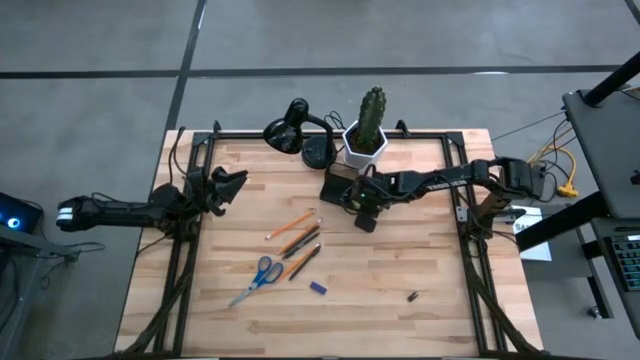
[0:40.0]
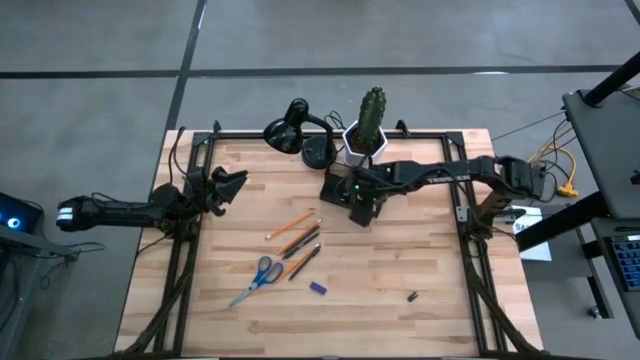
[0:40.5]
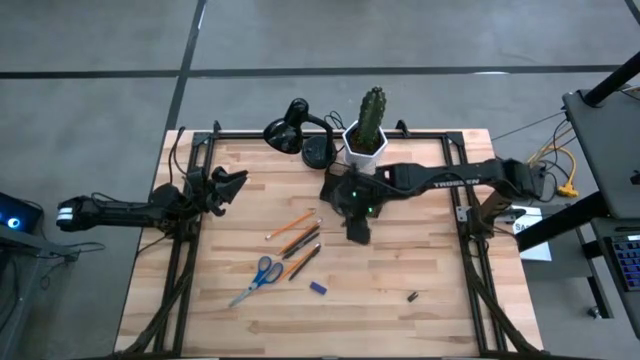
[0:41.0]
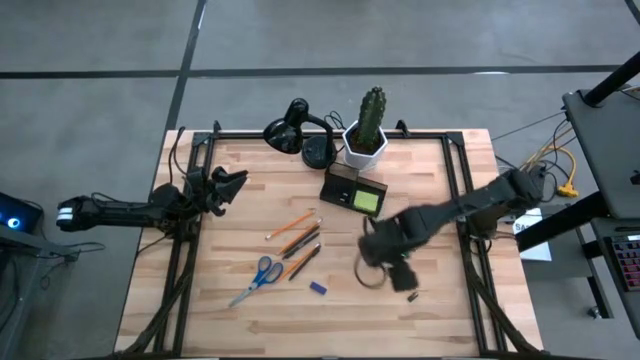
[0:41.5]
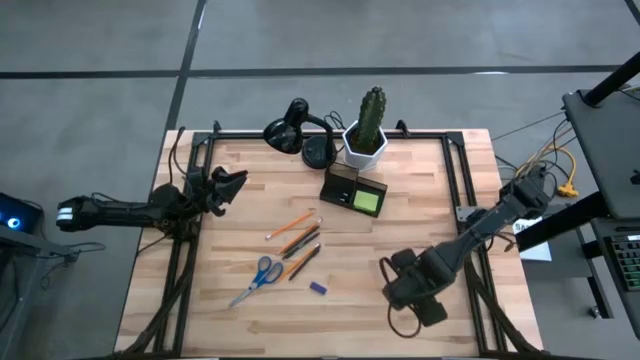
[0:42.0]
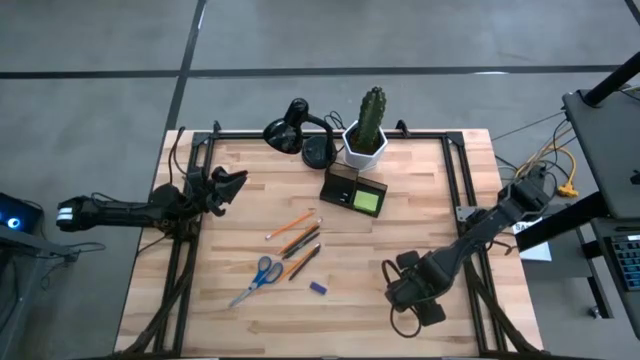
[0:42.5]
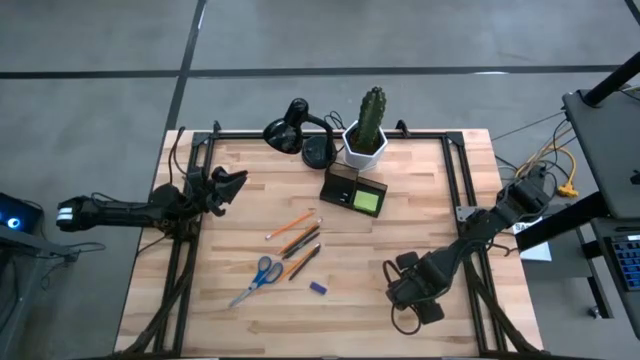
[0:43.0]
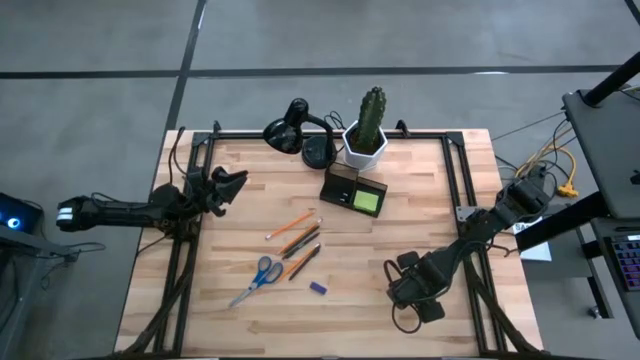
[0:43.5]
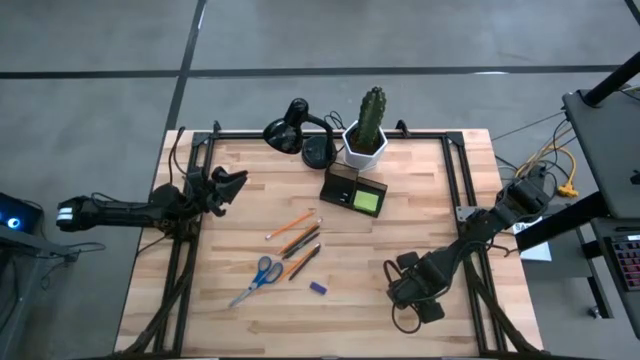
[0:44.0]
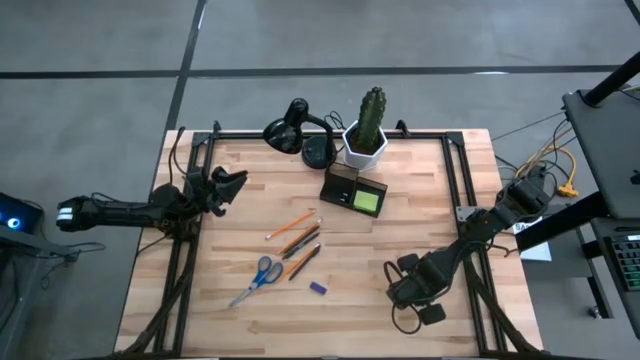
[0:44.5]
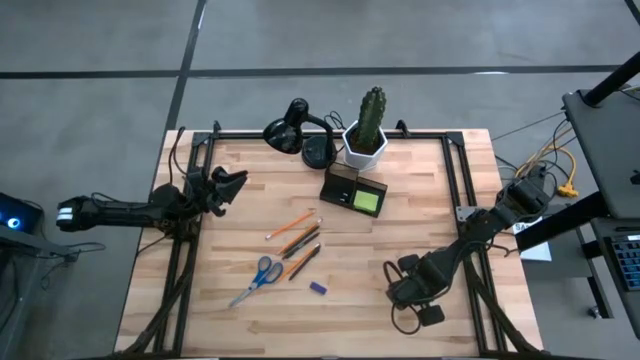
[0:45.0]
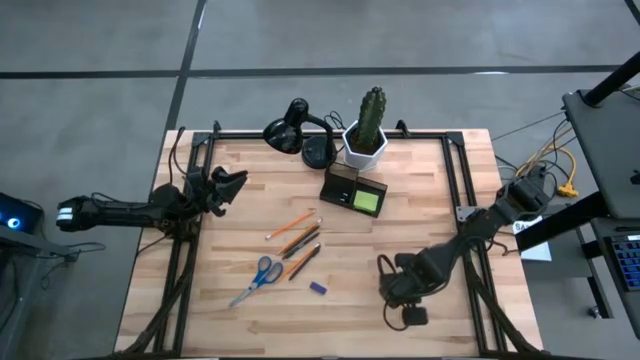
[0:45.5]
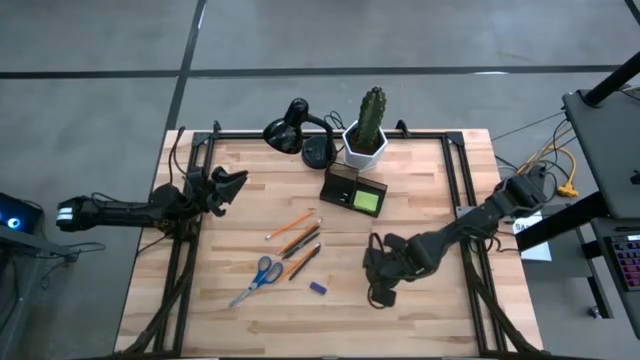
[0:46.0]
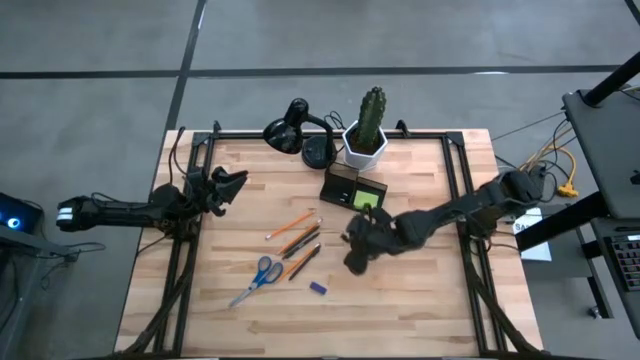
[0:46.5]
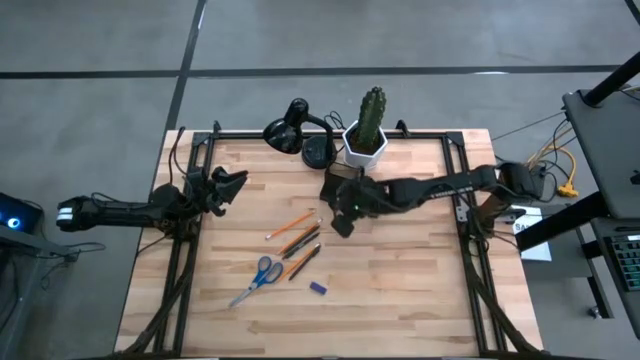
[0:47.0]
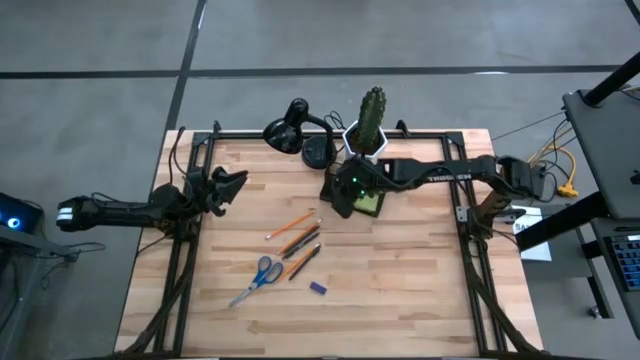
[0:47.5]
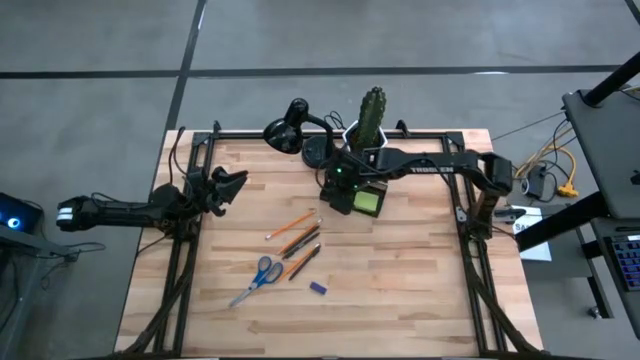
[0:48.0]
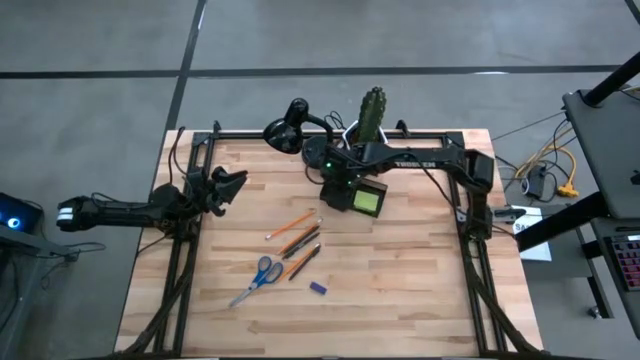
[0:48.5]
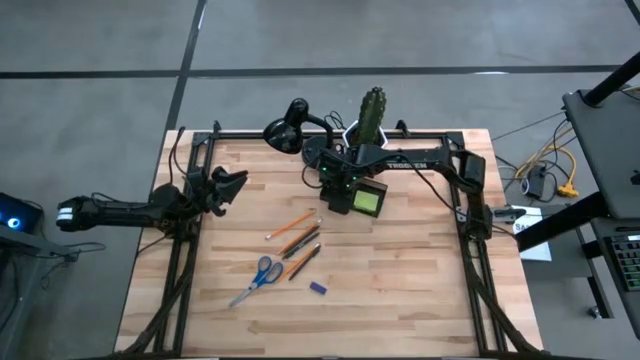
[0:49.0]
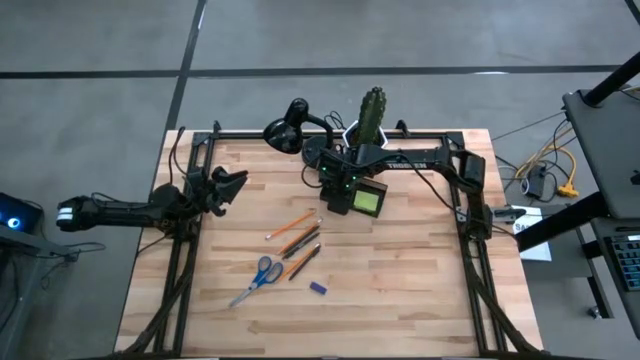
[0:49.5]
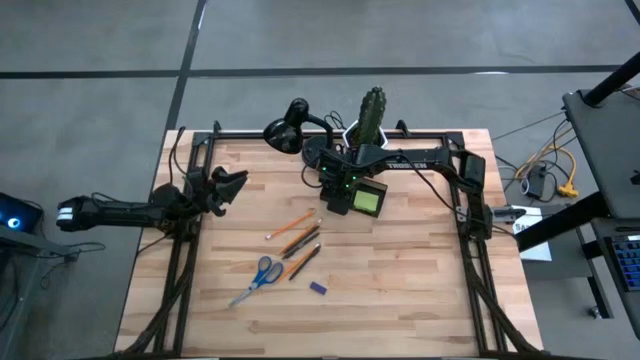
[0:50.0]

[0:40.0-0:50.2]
Task: Pick and place office supplies into organizer
Put the black binder clip into the black desk organizer

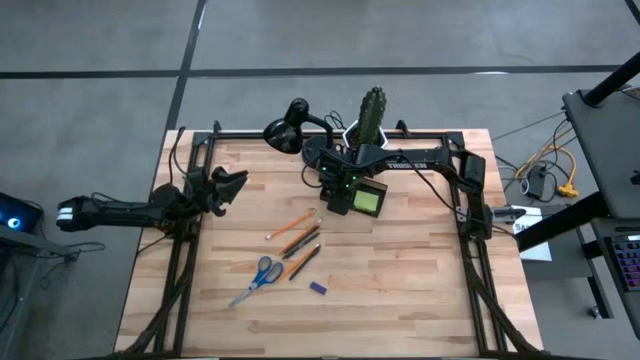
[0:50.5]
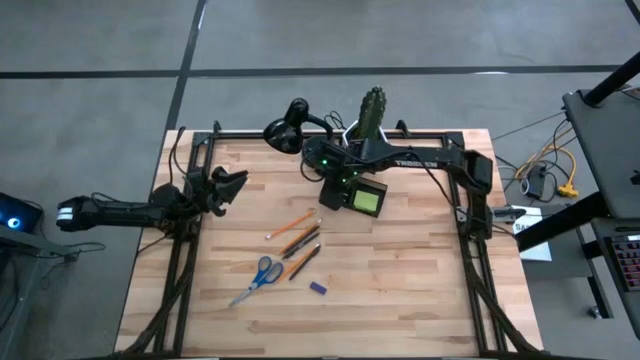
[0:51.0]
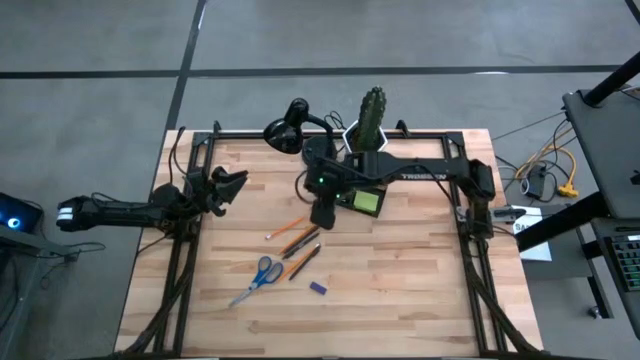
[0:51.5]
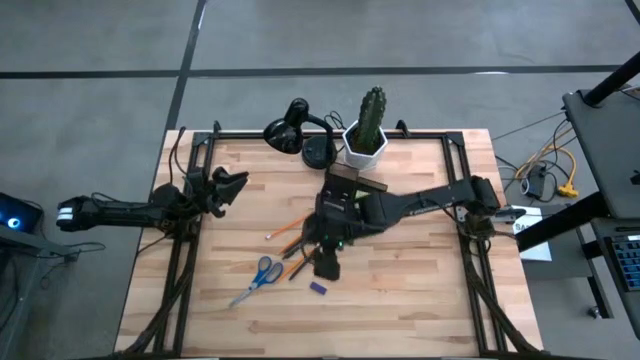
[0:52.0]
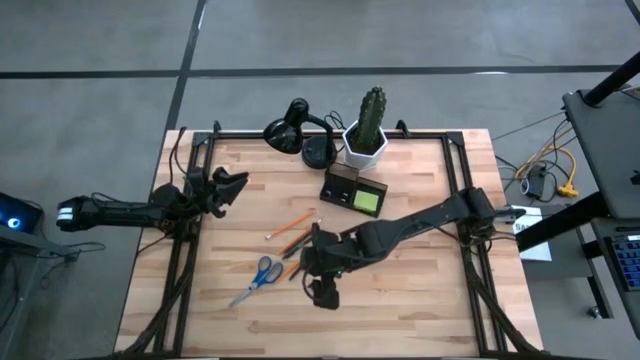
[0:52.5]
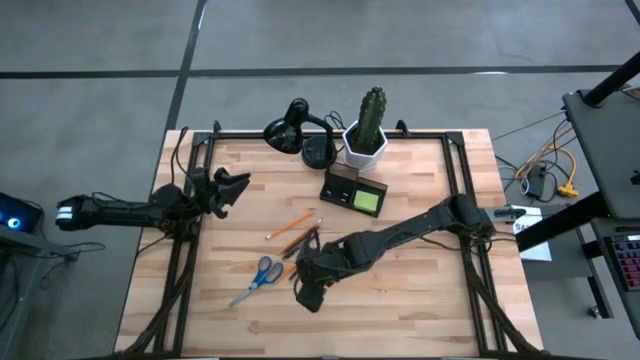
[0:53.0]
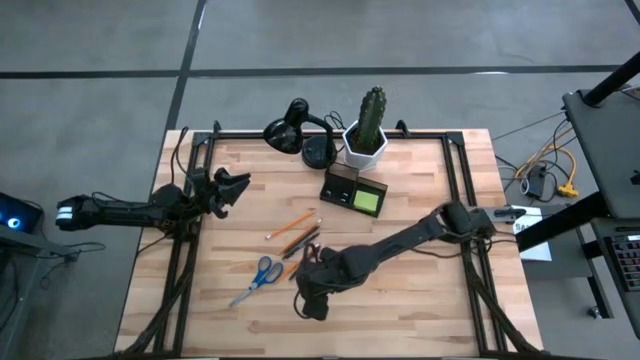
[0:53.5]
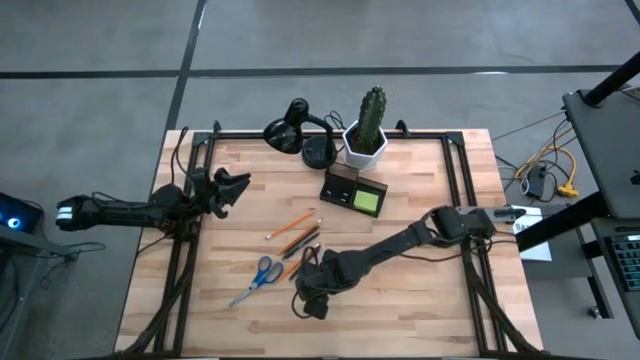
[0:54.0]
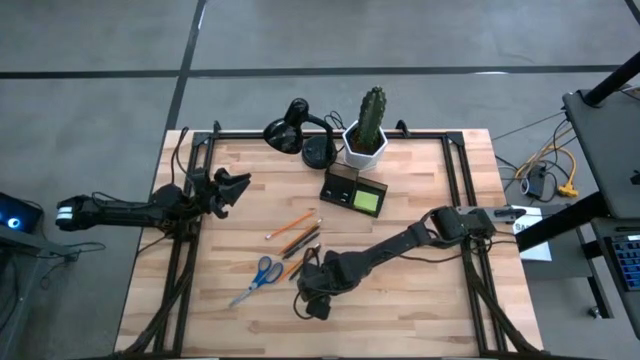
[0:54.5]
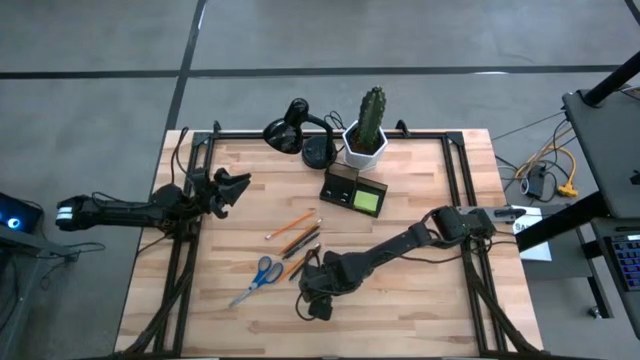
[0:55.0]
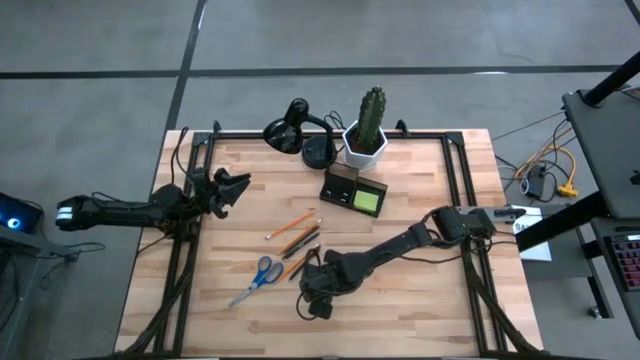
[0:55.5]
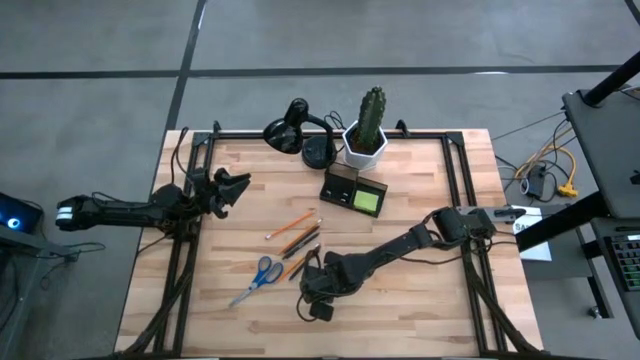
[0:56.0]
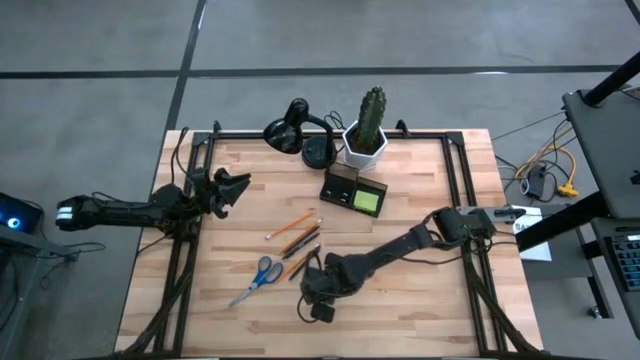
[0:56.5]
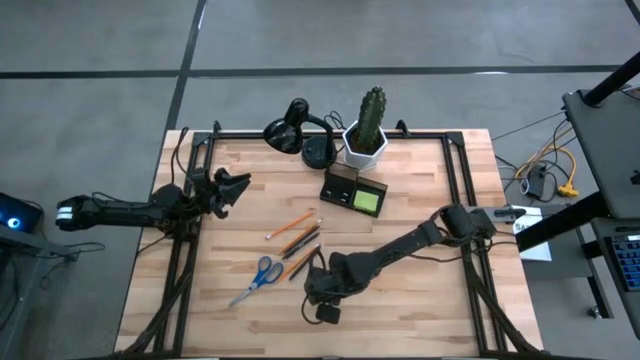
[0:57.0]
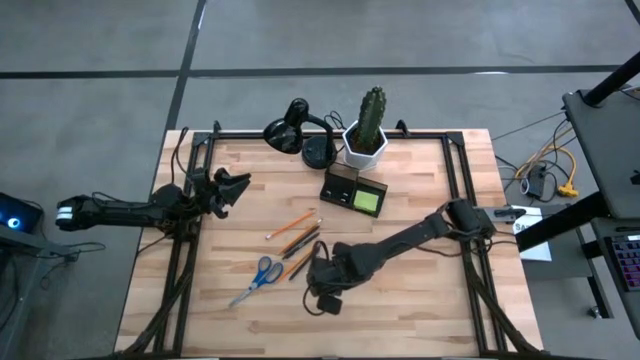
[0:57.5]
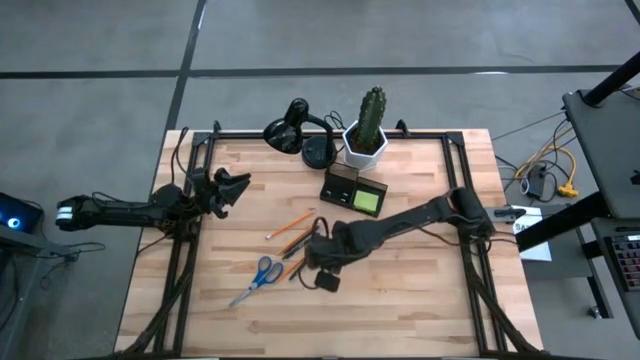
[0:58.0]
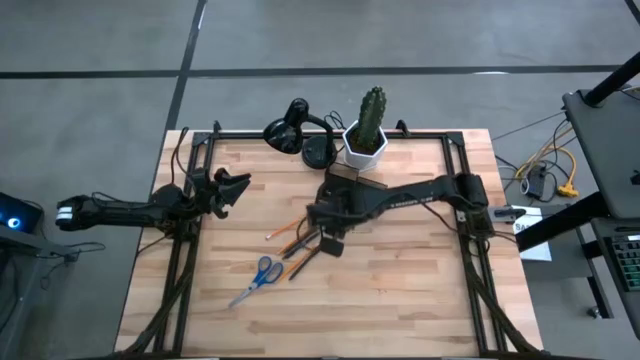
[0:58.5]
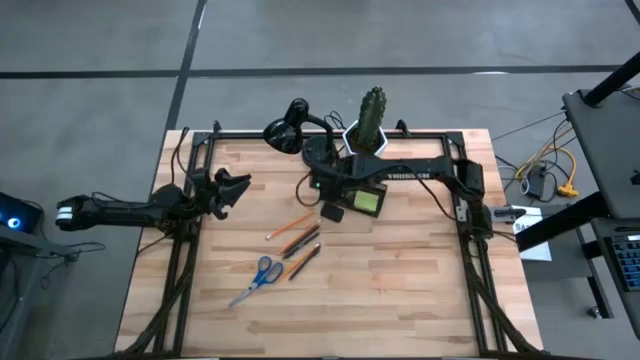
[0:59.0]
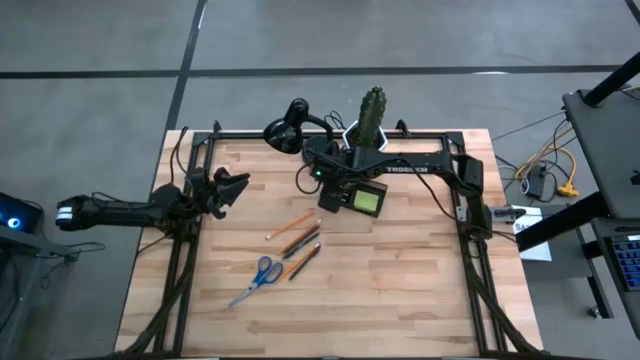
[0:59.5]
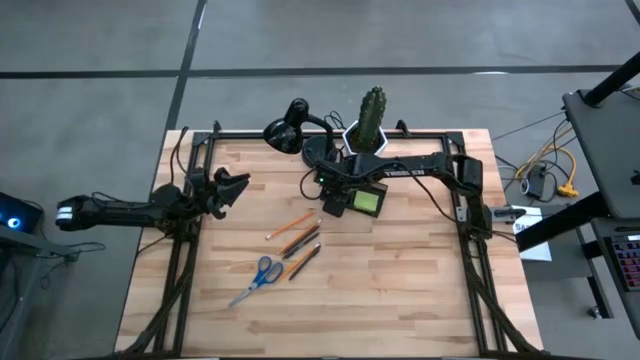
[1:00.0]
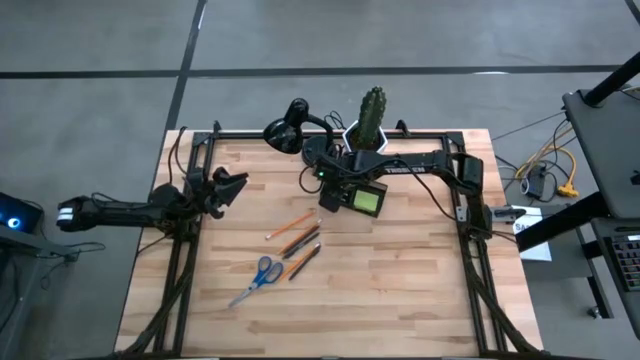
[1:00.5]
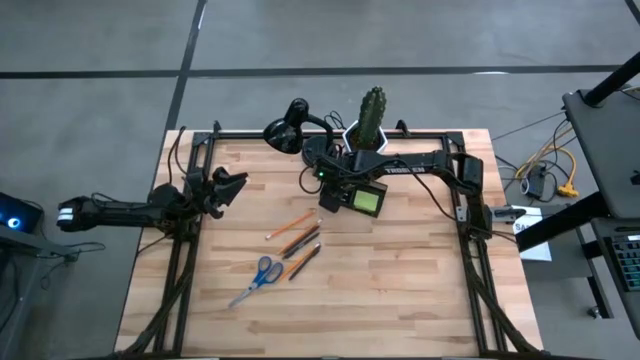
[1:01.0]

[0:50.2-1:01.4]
Put the blue eraser into the black desk organizer
